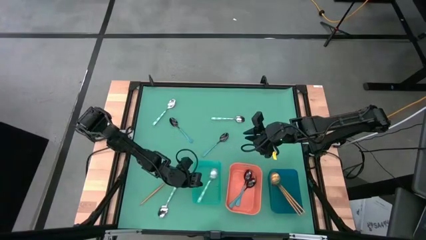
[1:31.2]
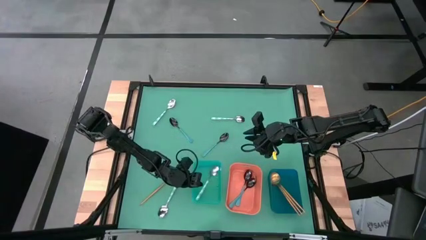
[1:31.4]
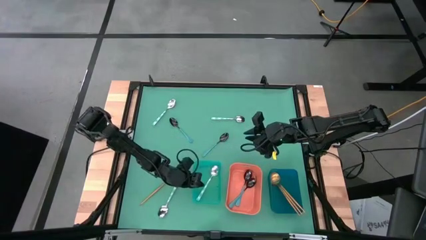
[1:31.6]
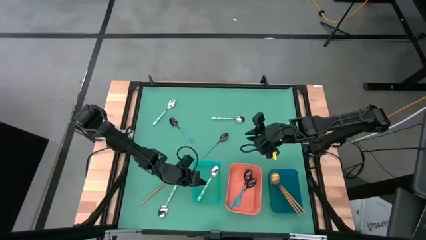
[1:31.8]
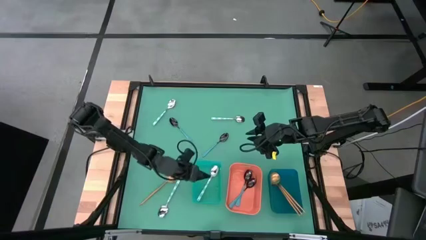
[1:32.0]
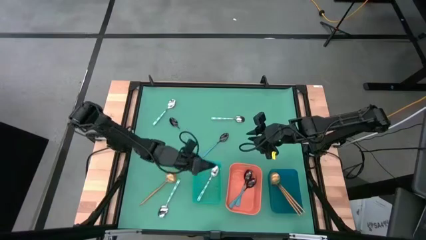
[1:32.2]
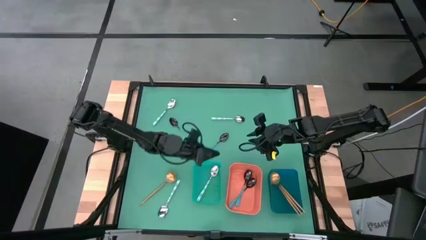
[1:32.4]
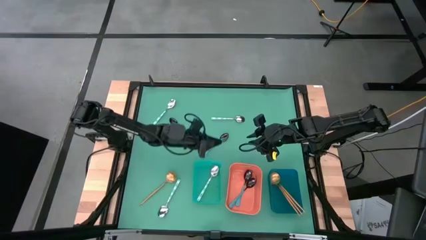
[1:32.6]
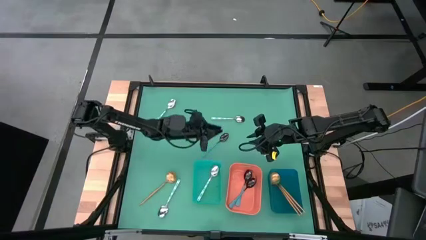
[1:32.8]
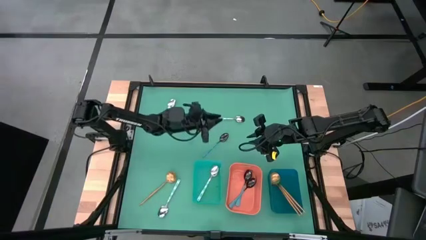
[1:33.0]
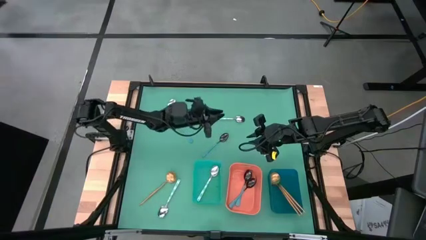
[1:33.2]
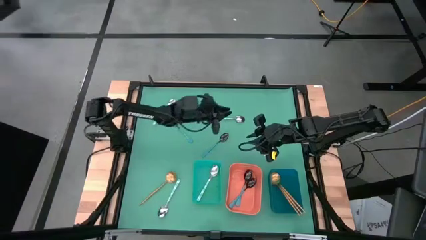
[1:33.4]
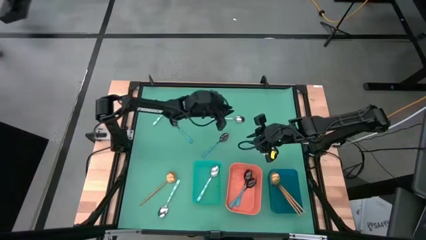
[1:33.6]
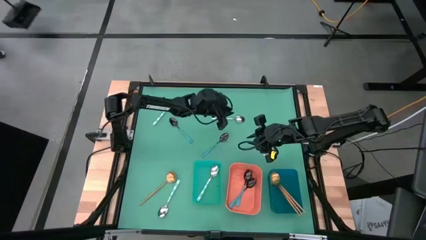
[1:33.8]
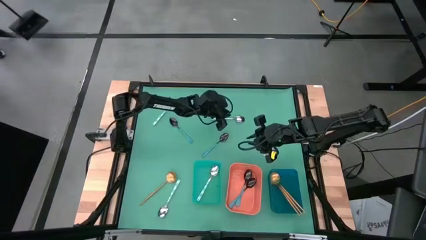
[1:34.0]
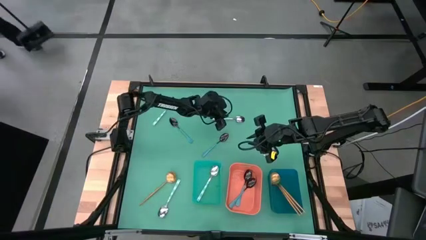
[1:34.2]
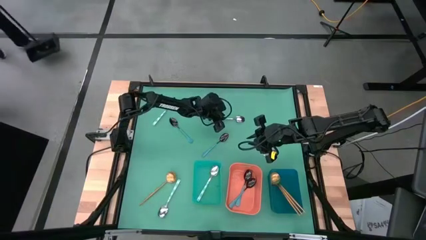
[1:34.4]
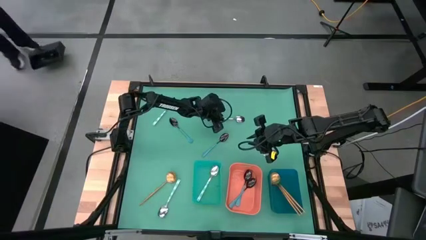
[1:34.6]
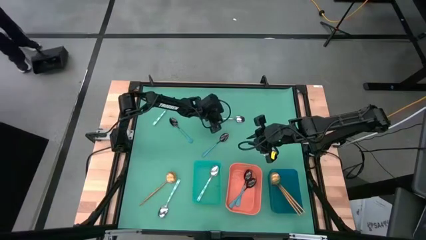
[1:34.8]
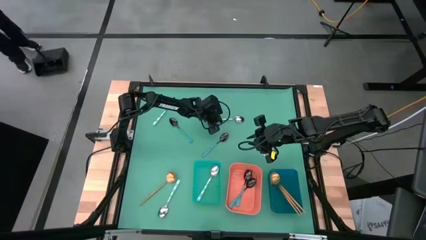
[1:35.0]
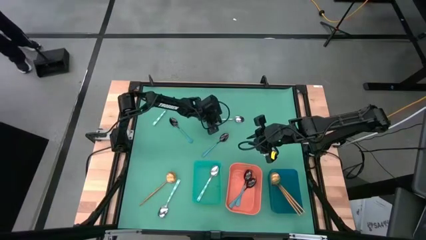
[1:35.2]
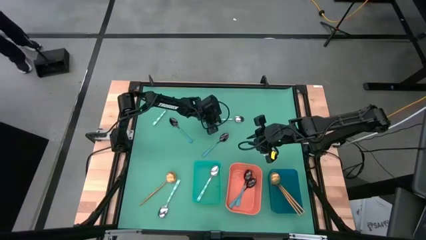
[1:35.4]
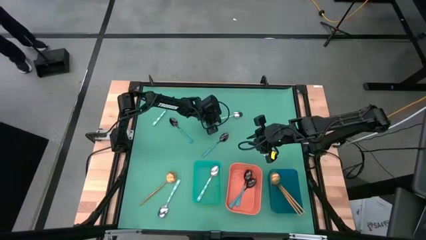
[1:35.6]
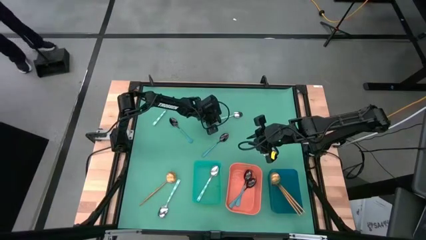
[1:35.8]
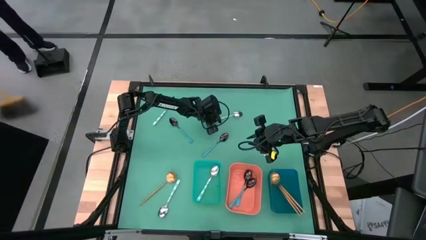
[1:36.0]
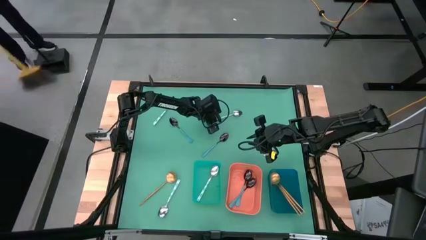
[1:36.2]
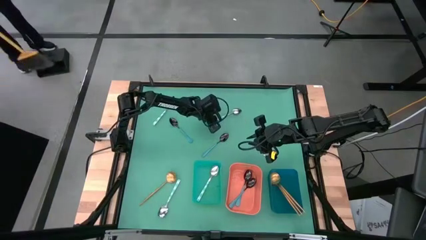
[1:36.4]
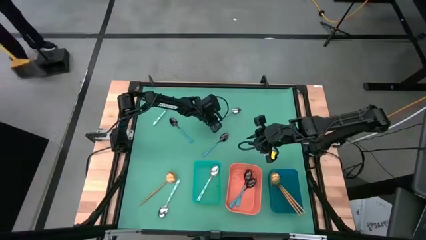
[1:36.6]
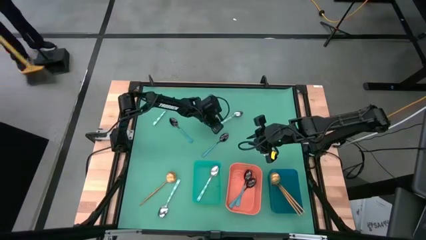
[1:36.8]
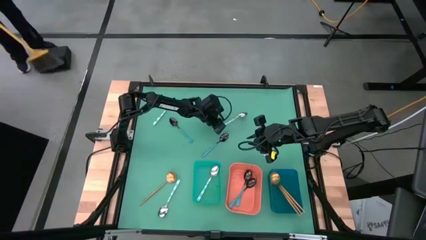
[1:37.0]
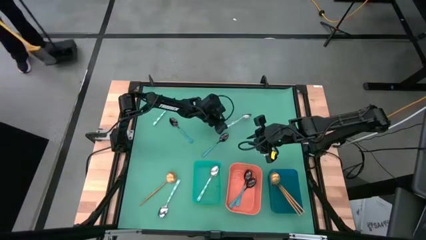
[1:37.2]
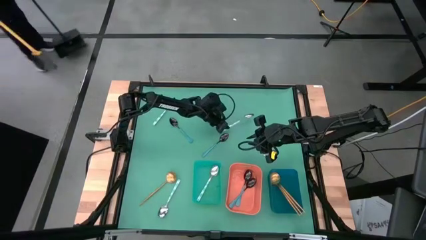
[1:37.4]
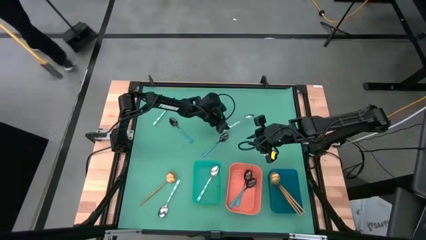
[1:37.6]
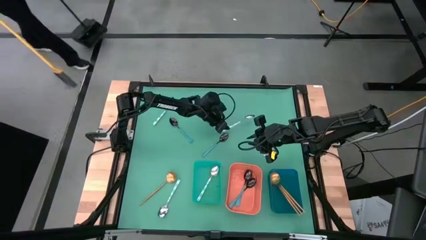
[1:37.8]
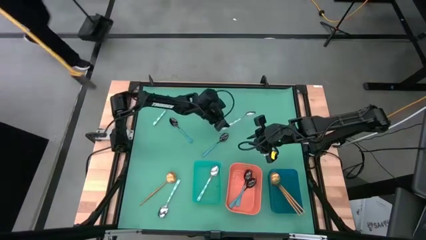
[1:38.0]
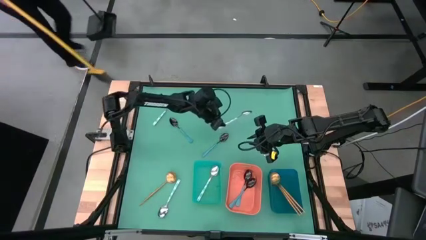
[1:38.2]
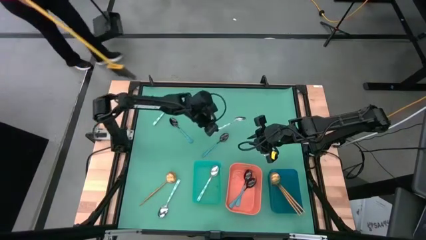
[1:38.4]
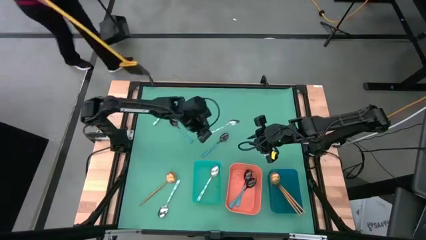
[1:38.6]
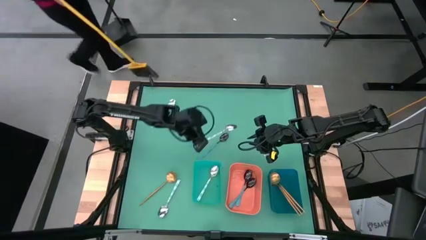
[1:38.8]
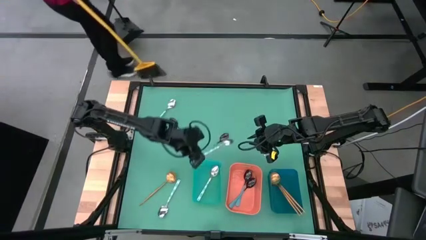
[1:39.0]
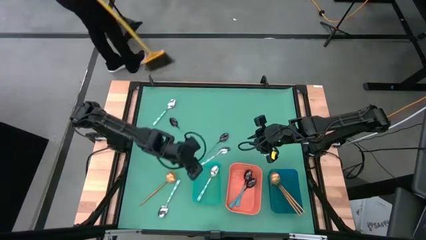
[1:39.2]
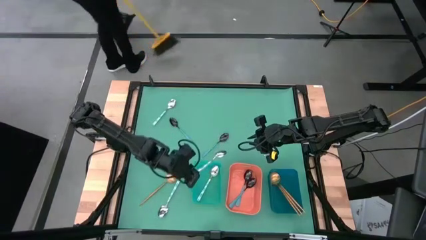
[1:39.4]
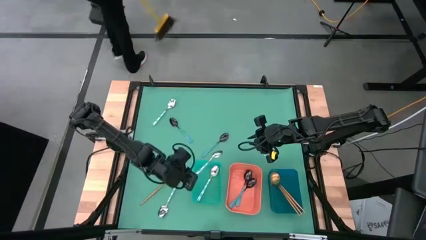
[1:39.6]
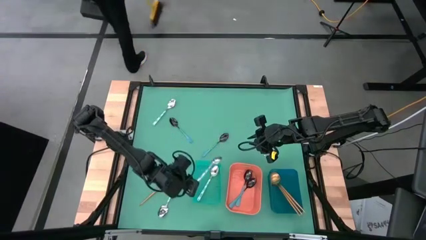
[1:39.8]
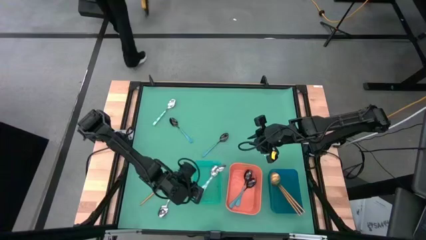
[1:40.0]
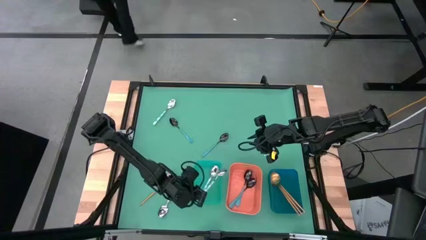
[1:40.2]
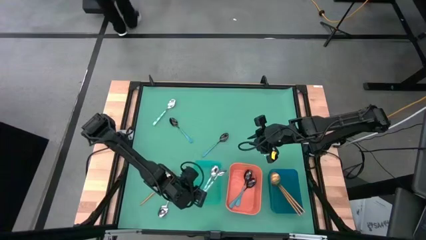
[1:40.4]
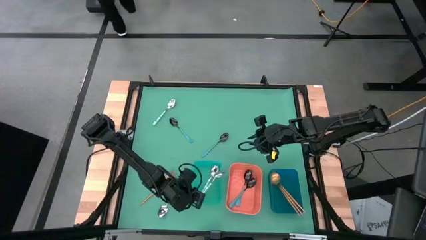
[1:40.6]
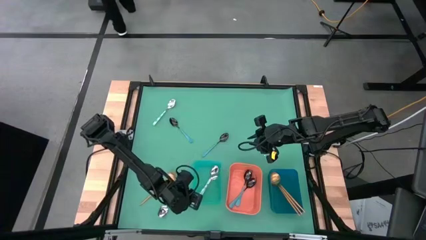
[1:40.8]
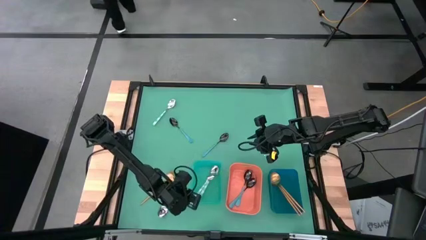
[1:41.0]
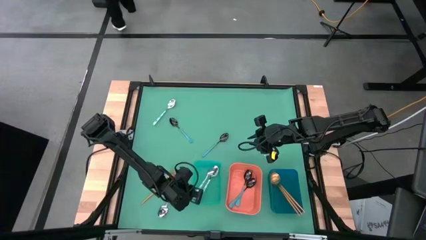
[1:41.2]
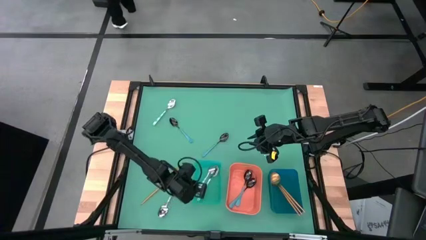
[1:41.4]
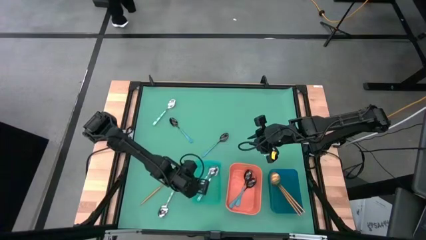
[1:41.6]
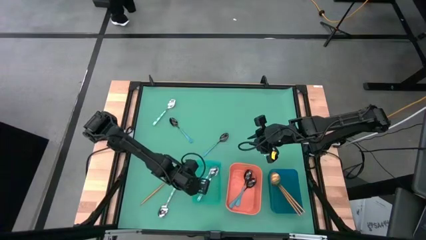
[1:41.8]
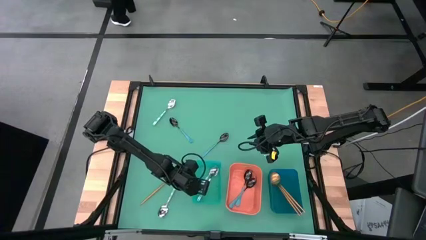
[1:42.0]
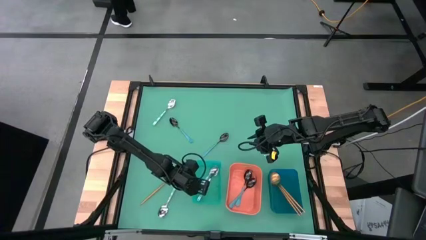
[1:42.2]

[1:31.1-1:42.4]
Task: Sort silverware by color (type)
Put the light blue spoon into the light blue bin

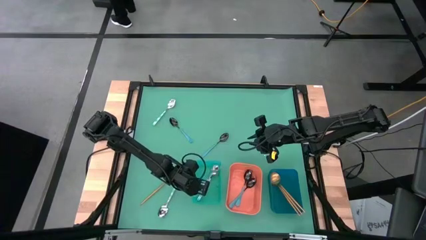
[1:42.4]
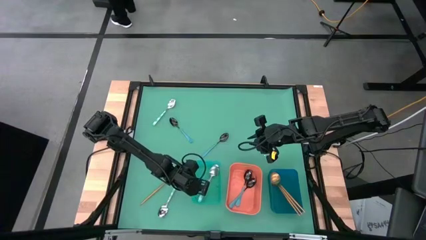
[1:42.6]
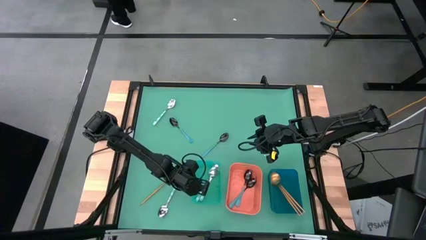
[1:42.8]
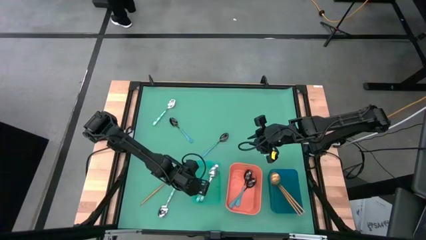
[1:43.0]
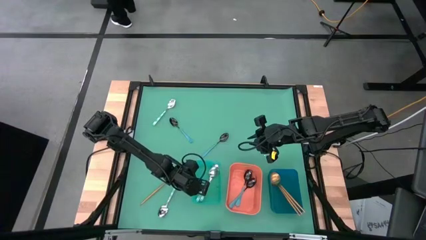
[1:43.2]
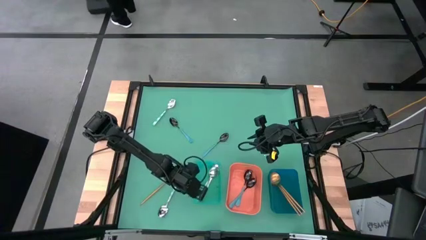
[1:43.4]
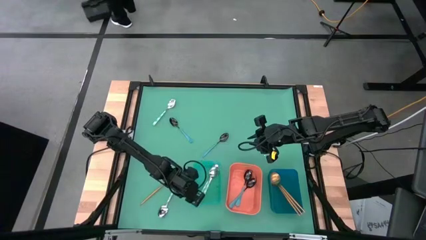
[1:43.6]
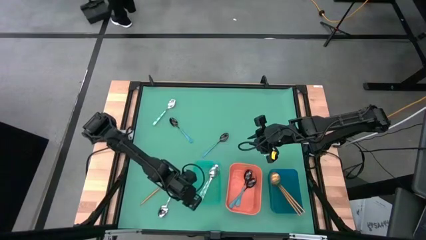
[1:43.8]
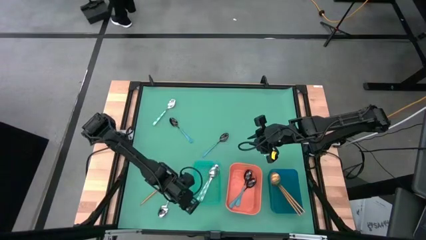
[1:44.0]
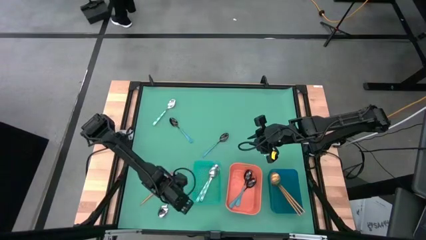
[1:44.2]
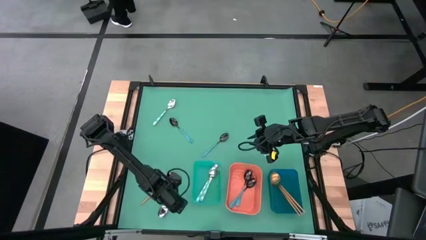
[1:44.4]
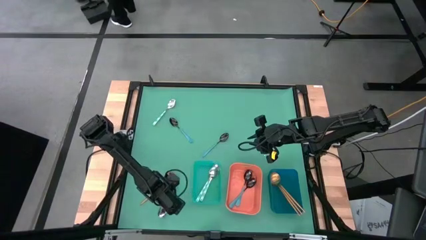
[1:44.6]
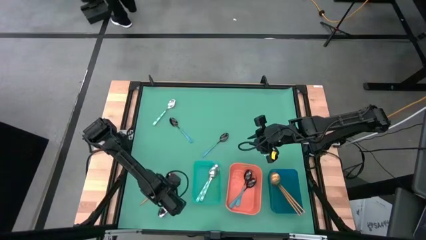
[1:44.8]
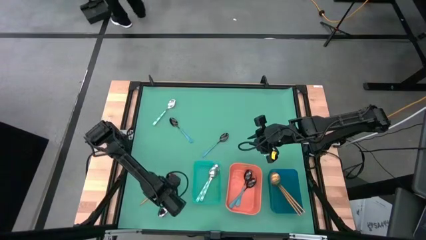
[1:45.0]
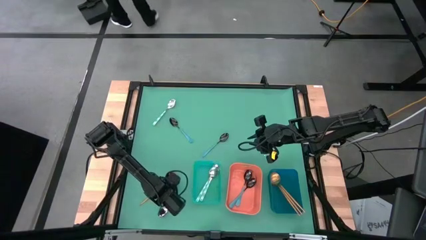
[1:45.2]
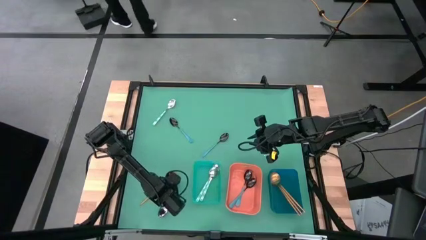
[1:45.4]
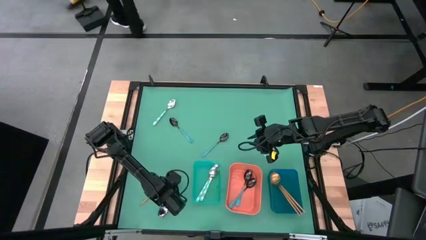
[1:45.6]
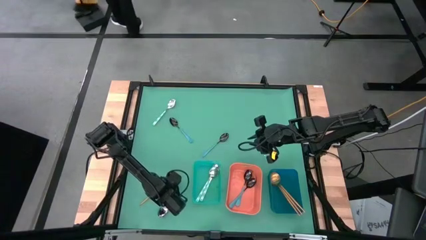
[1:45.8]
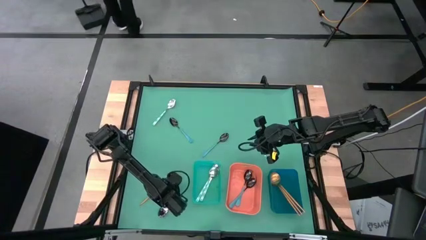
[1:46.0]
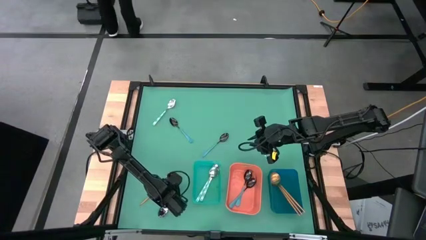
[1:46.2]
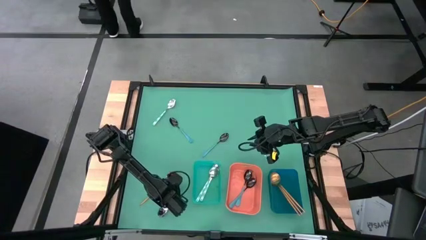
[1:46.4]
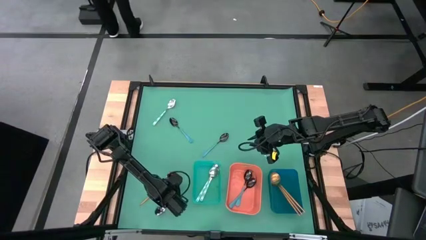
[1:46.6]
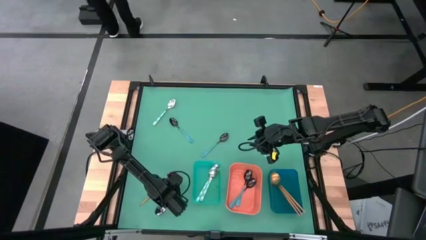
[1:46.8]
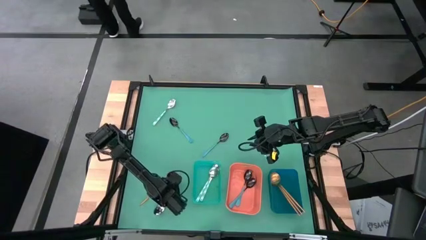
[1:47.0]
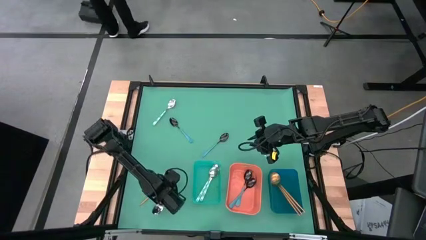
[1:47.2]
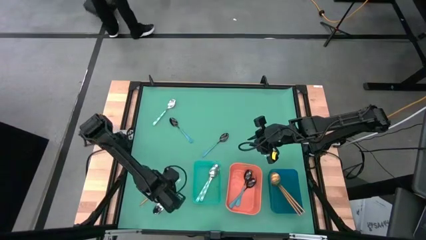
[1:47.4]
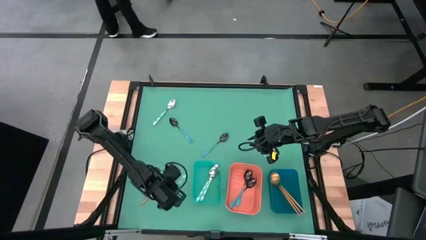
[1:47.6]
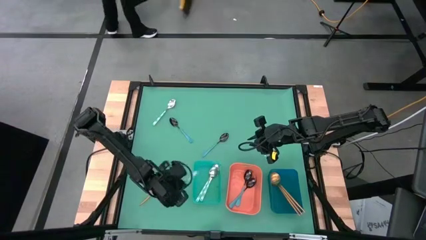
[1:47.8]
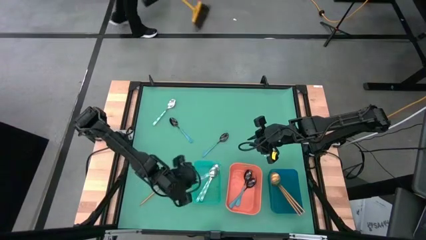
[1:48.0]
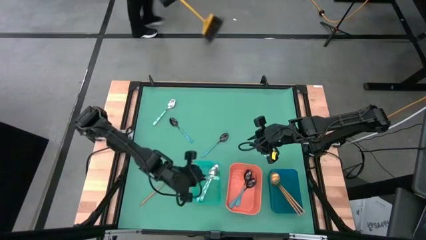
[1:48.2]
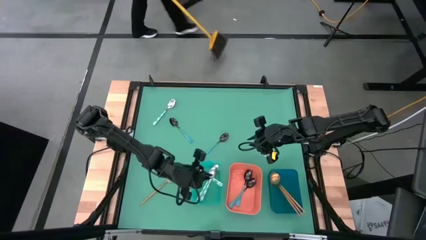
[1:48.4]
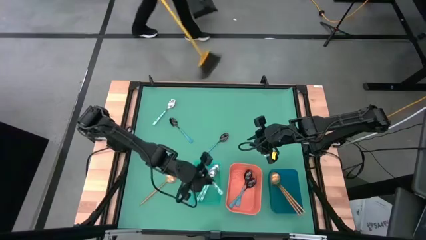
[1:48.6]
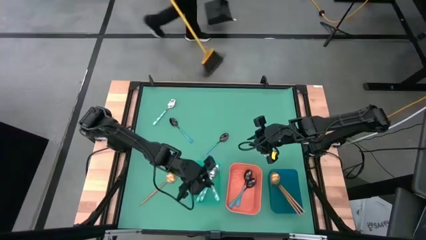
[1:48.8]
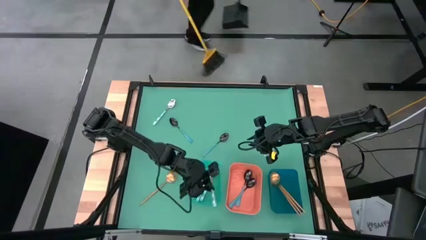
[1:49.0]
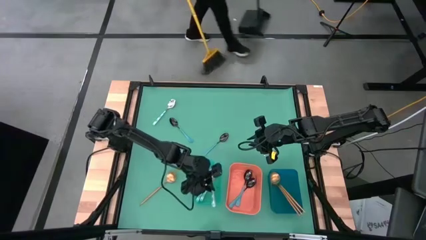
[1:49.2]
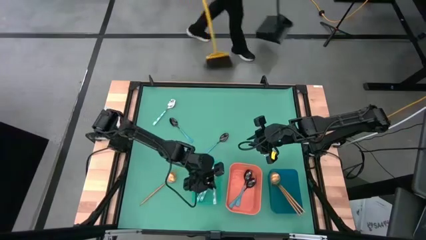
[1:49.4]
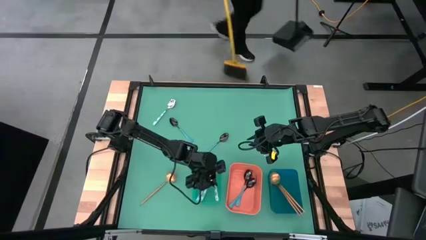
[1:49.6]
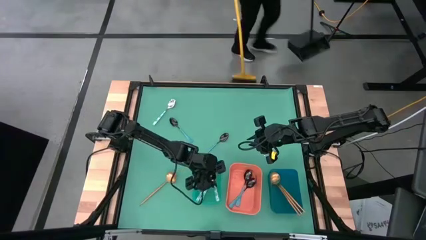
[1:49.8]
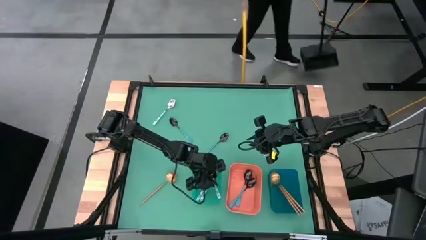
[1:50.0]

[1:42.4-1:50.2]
Put the light blue spoon into the light blue bin
